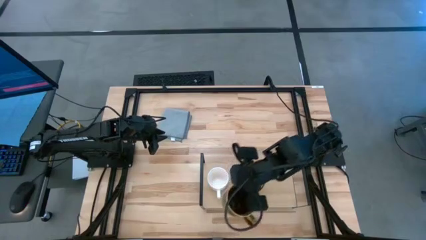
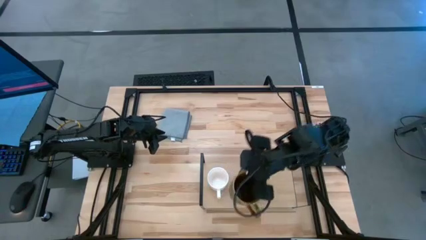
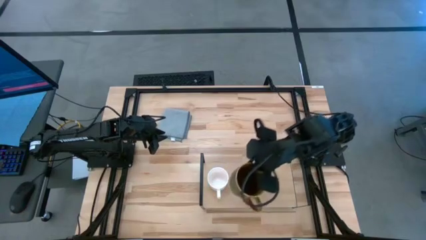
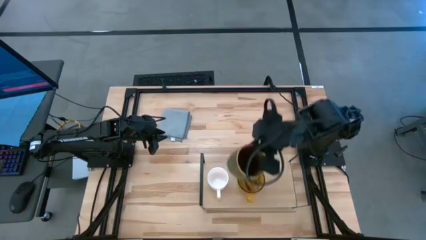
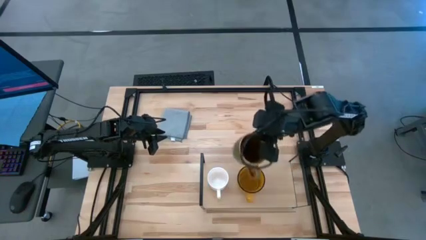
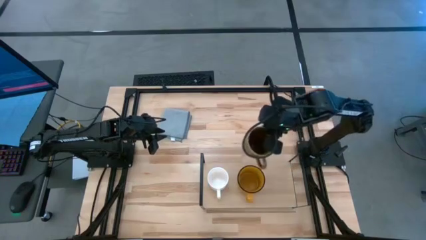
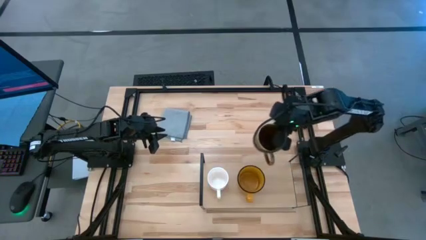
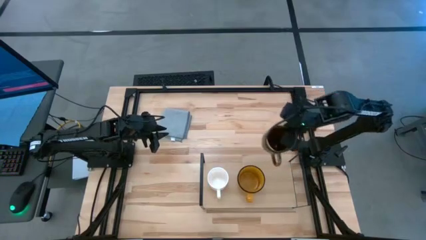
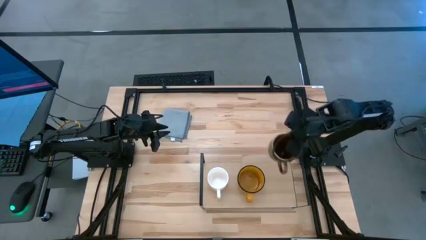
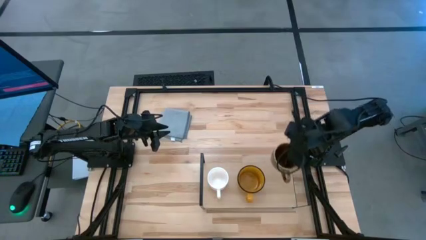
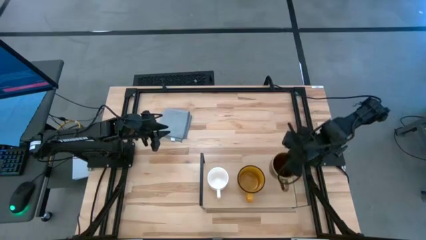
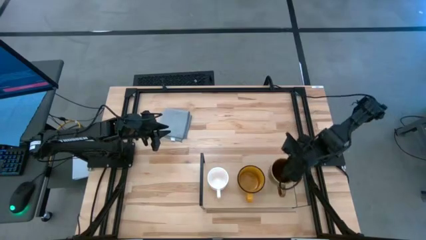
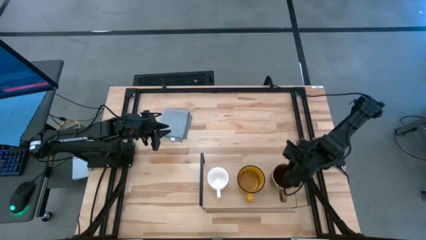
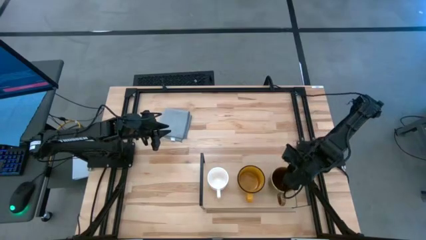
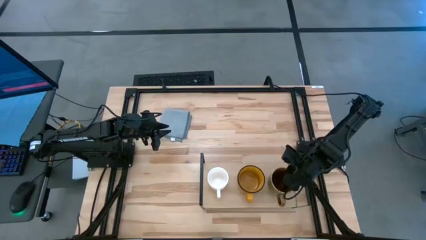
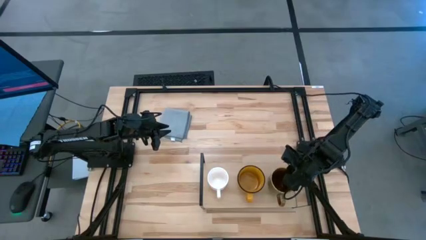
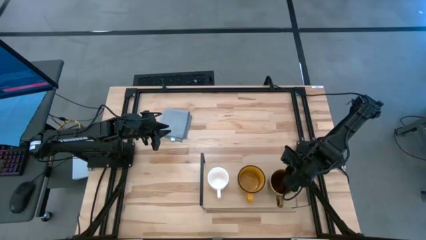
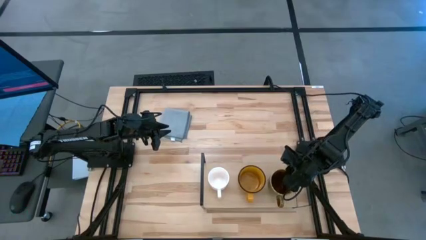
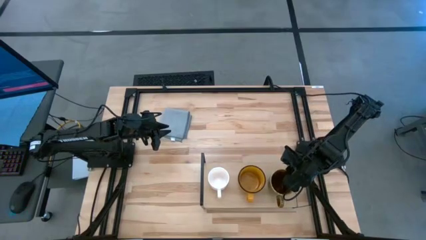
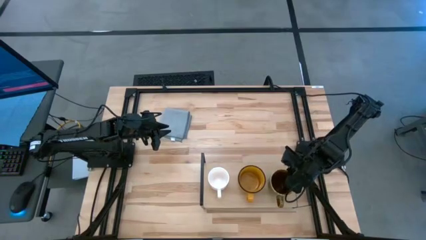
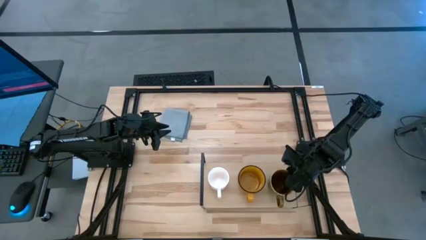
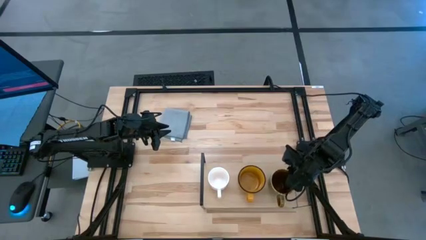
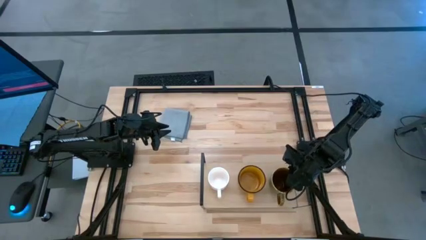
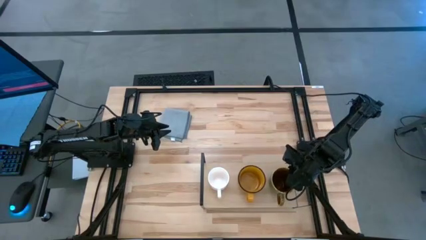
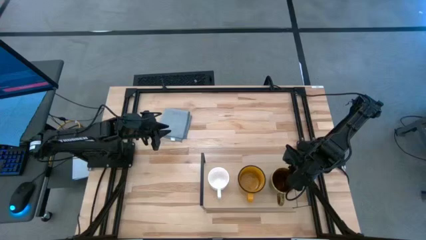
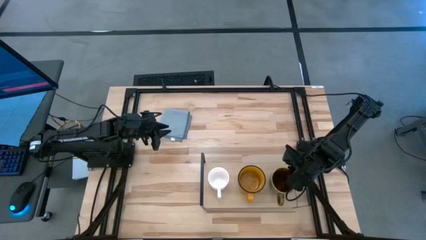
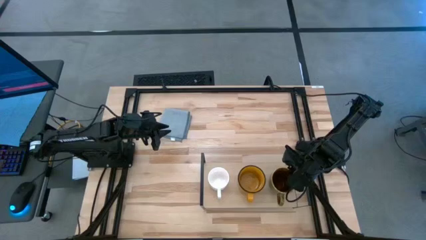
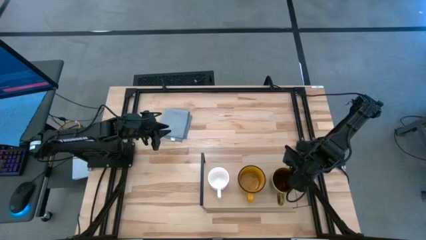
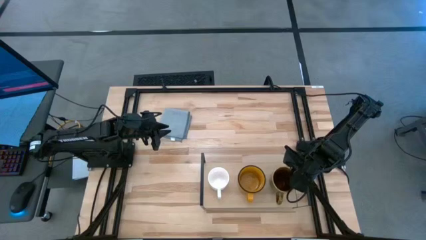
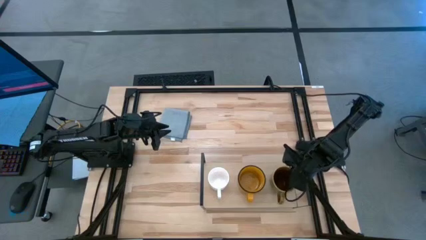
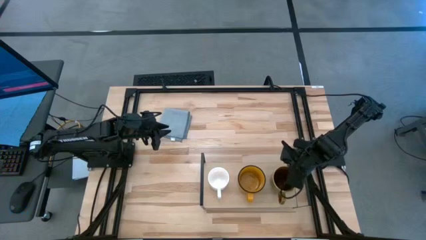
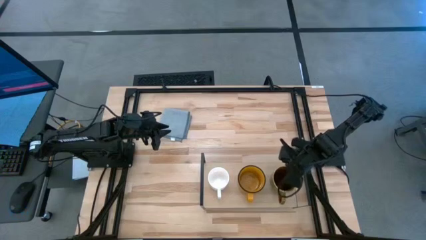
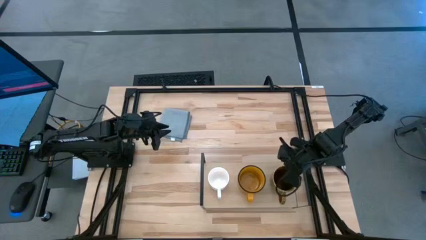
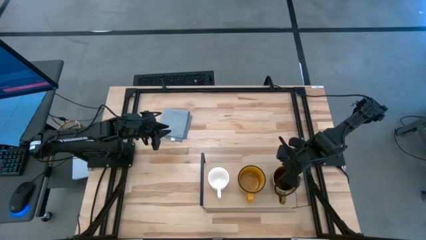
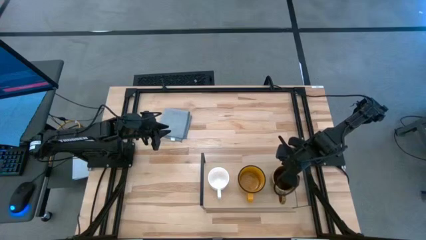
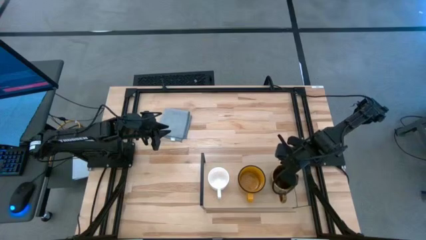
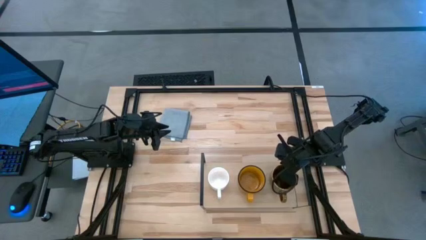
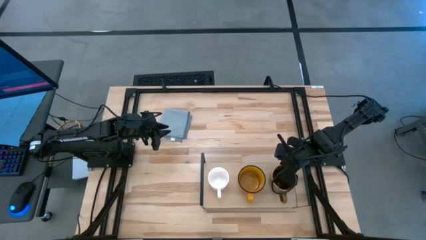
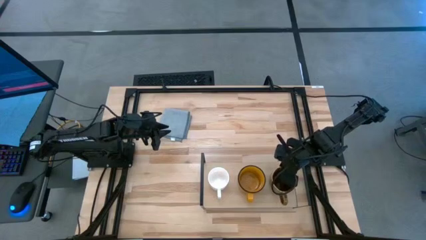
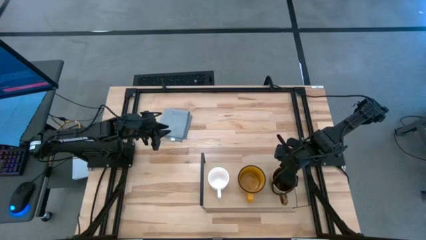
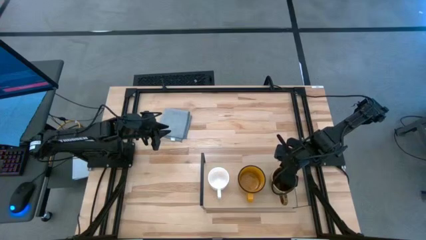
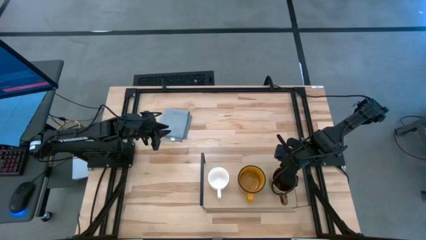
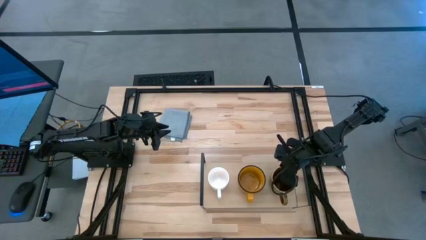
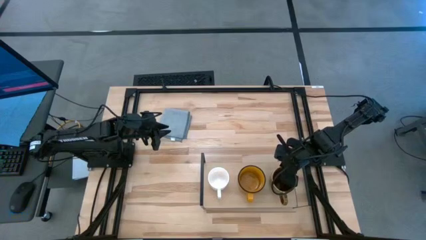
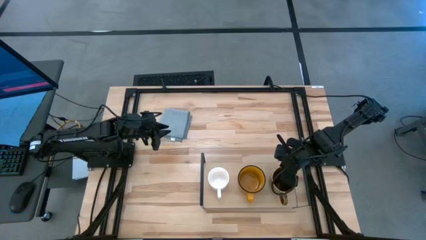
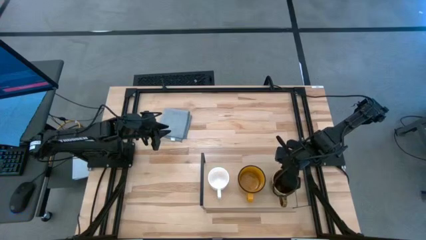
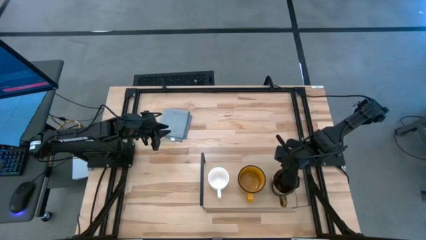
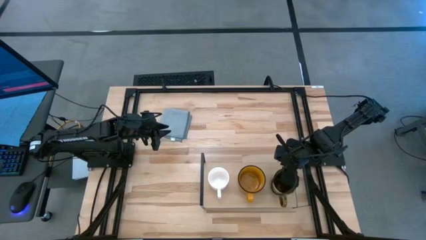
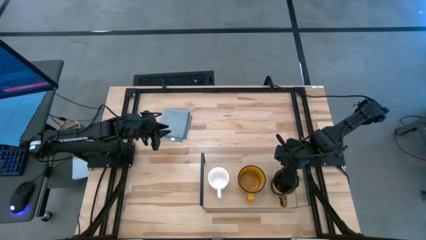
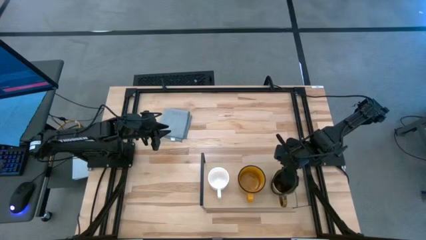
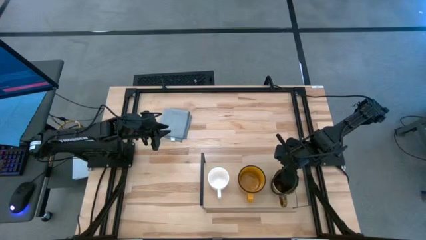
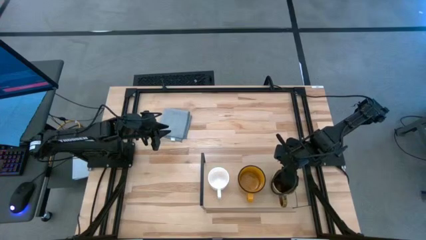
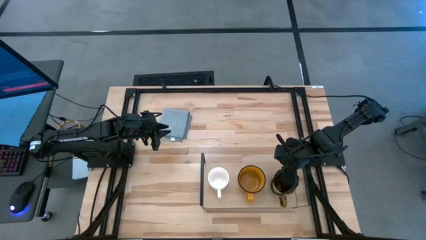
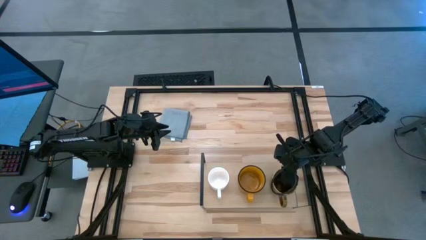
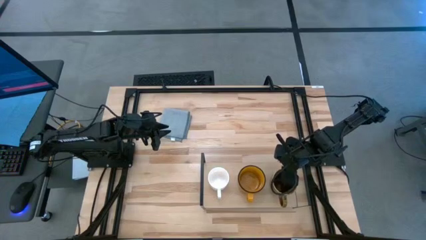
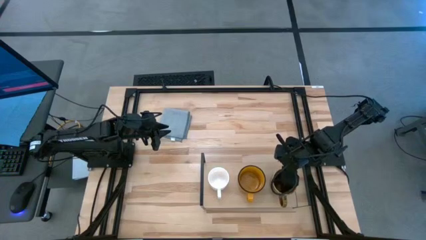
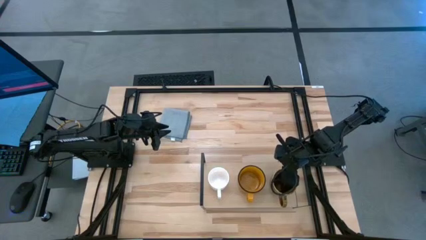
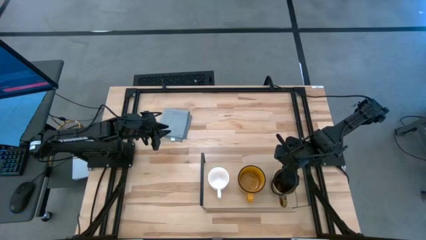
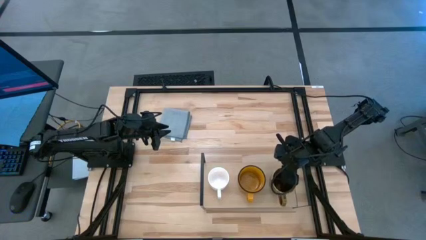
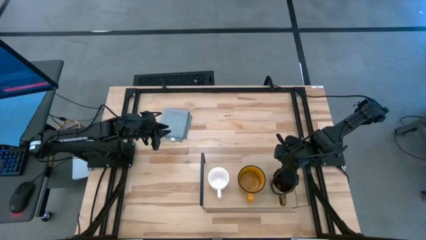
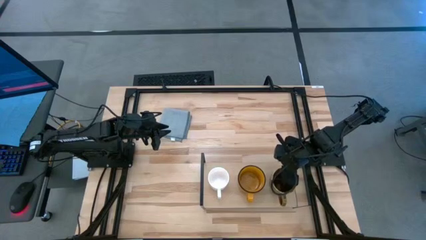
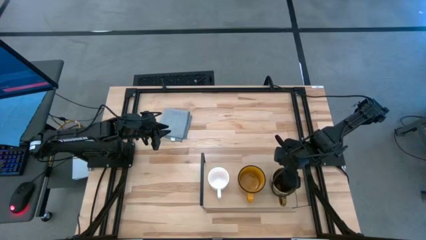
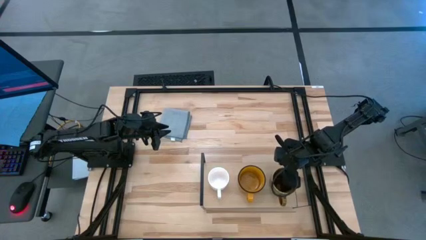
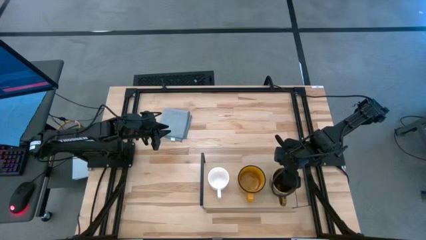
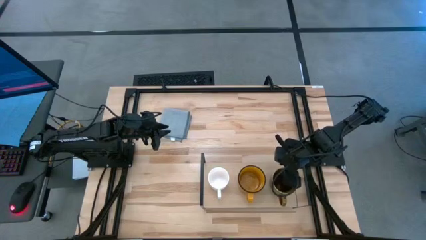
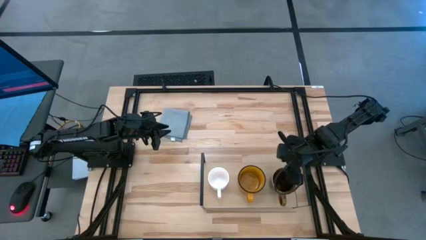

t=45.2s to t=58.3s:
Task: Stack small to large cups/mugs on shelf
Put the green mug on the shelf
